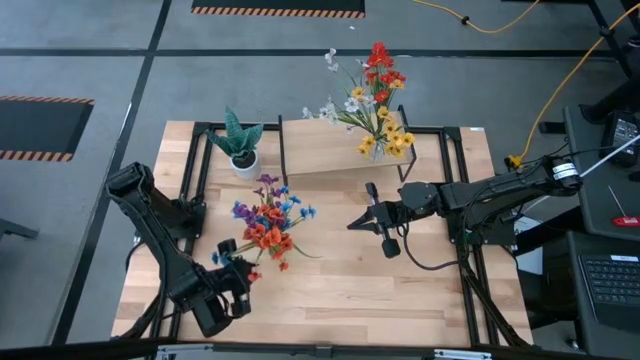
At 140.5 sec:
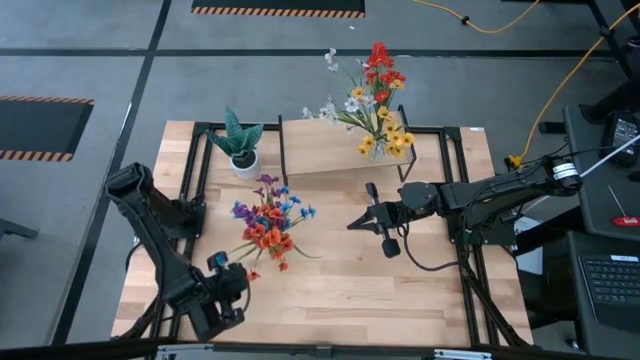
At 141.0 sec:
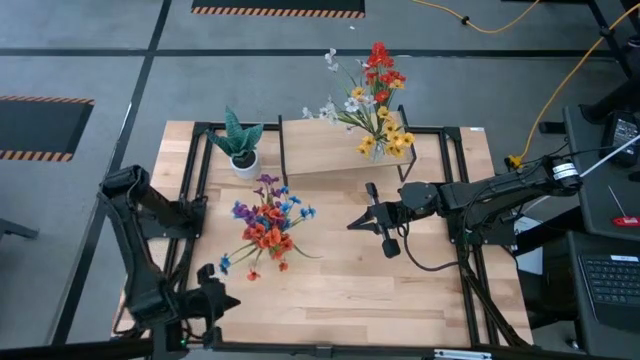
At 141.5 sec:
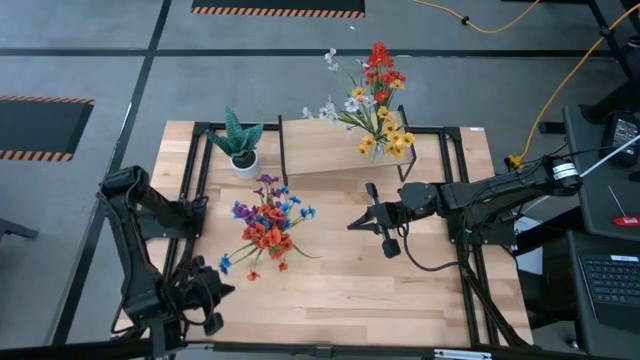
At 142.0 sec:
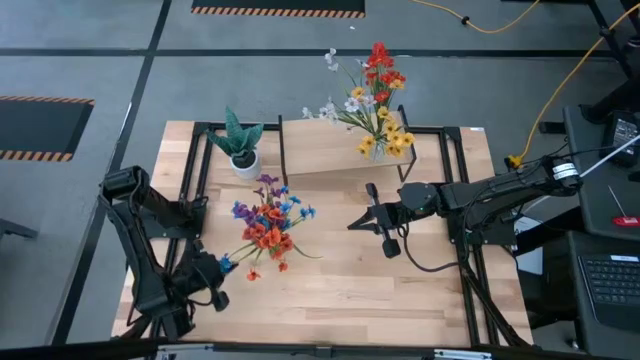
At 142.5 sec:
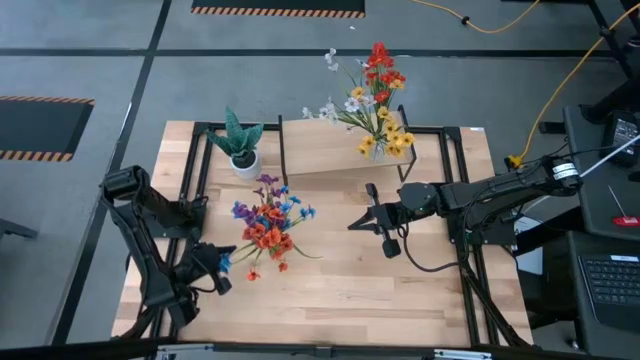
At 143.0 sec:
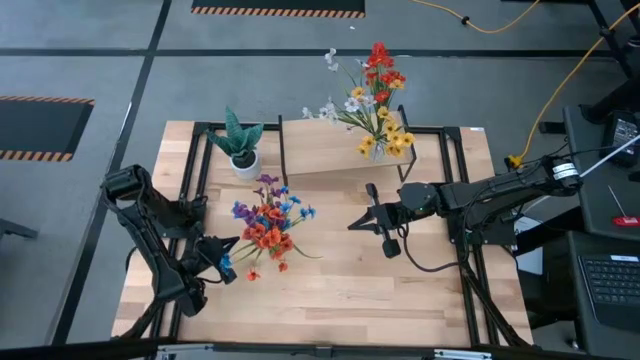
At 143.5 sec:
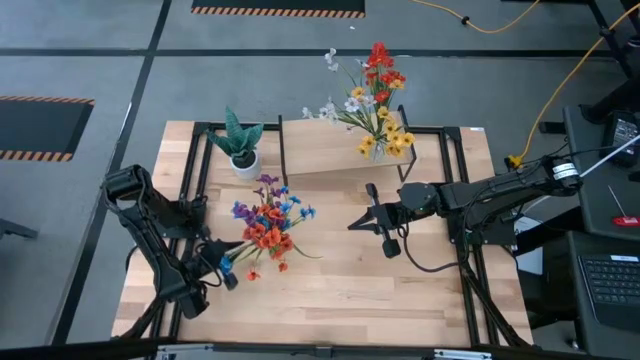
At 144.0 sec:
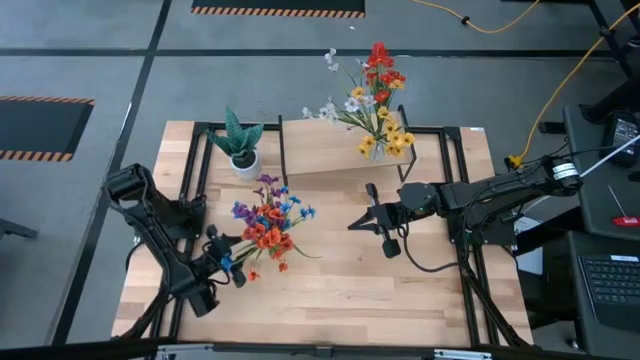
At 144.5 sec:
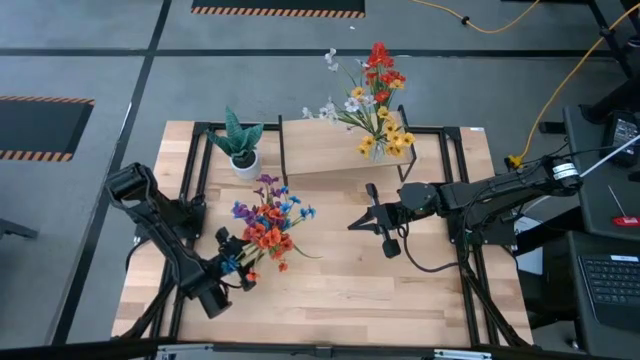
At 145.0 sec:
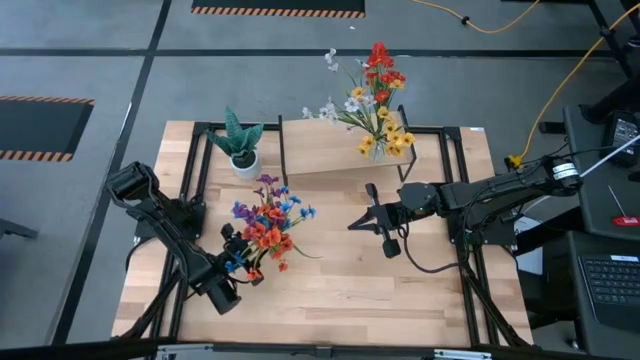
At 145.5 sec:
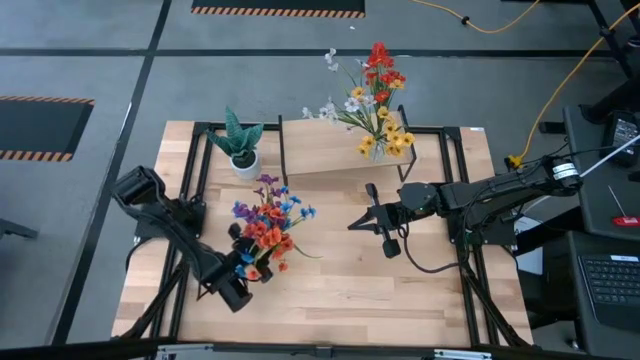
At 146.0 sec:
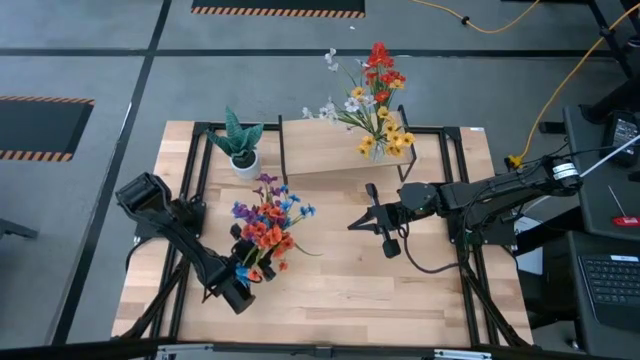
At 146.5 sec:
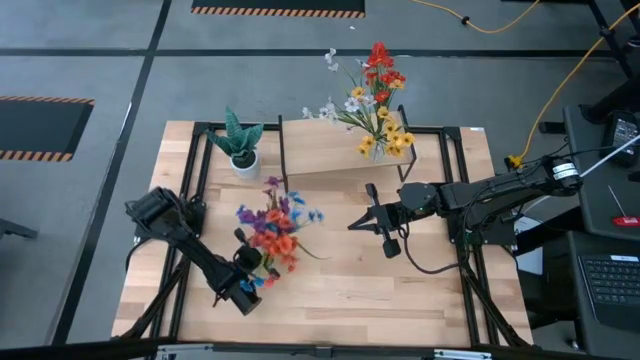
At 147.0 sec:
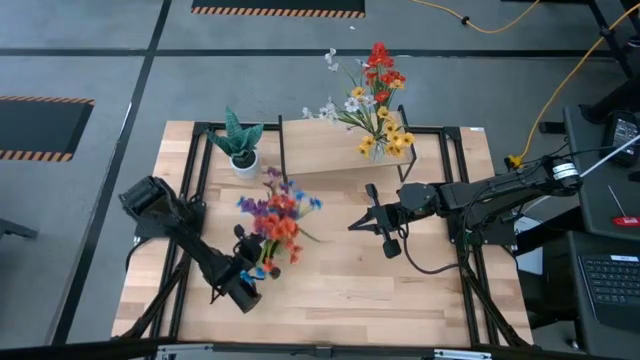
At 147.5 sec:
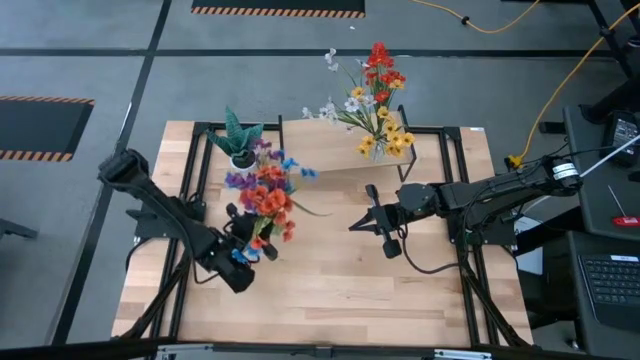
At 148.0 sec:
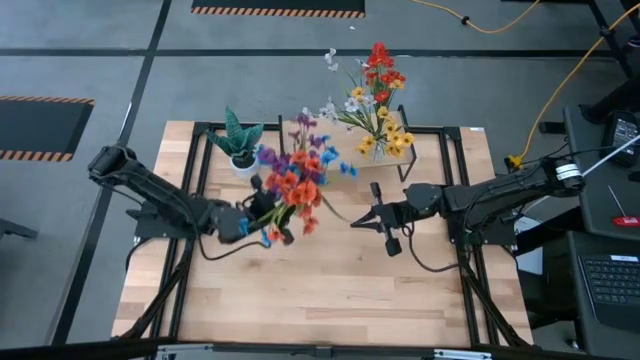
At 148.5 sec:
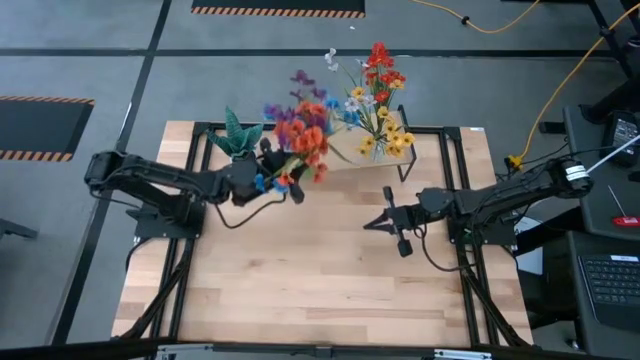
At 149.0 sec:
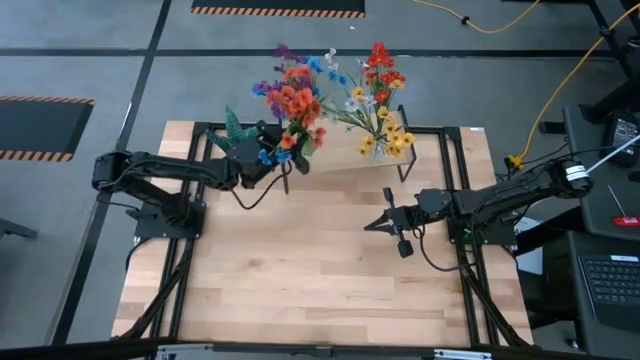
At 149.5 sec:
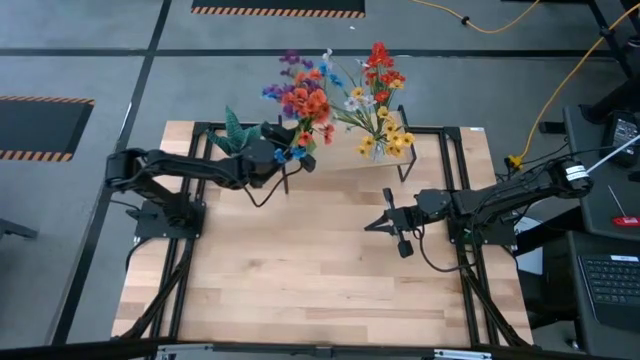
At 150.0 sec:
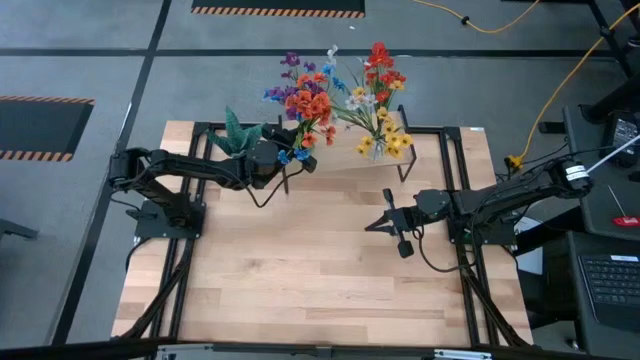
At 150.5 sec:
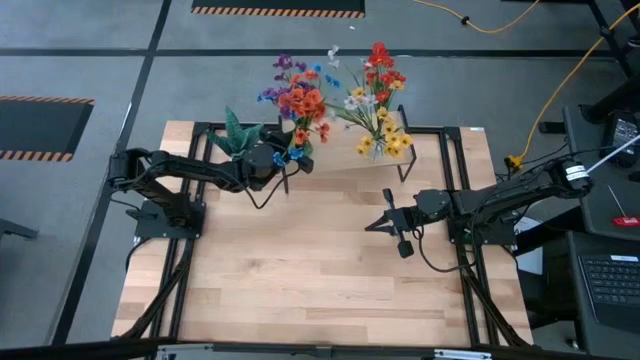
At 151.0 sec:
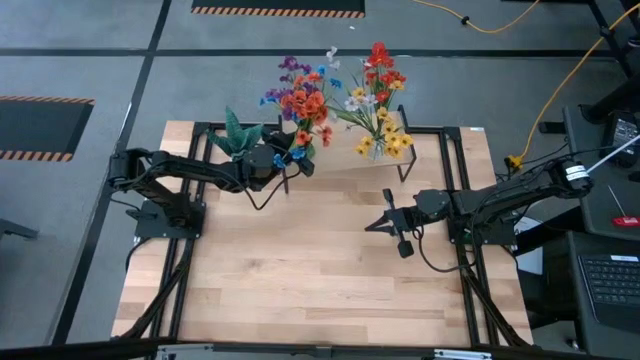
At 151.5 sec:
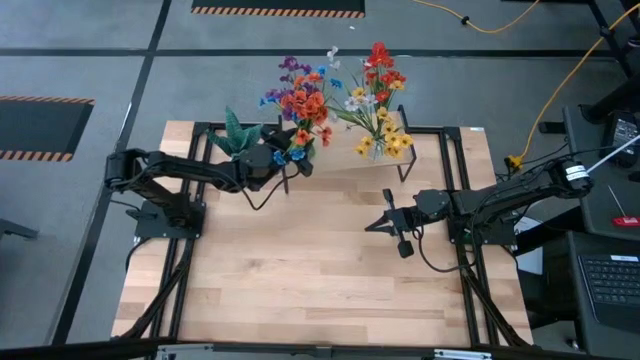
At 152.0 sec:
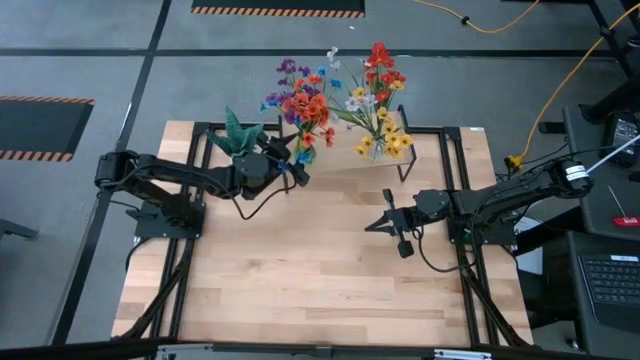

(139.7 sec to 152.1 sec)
Task: Pick and place flowers into a vace then onto a shelf
Put the green transparent vase on the shelf

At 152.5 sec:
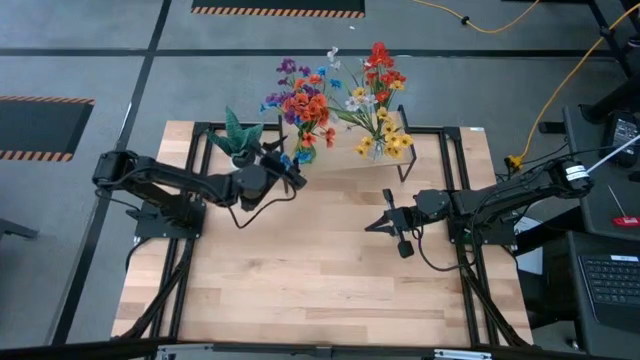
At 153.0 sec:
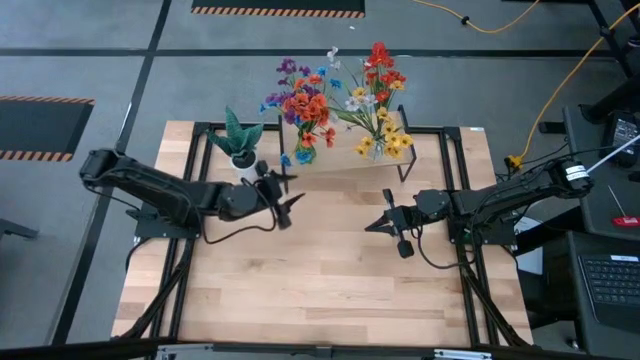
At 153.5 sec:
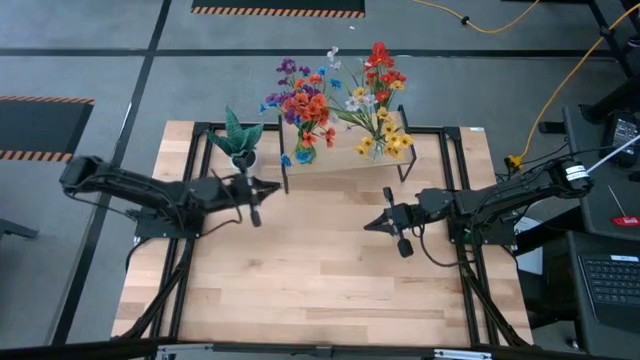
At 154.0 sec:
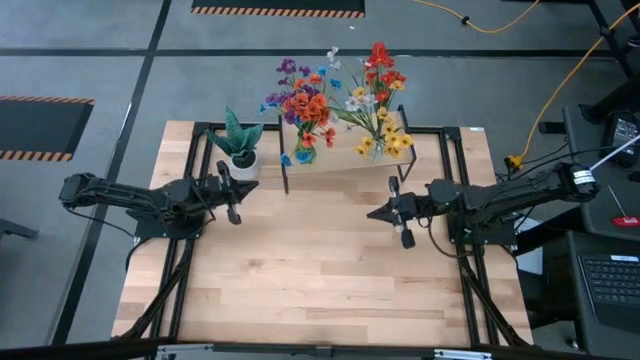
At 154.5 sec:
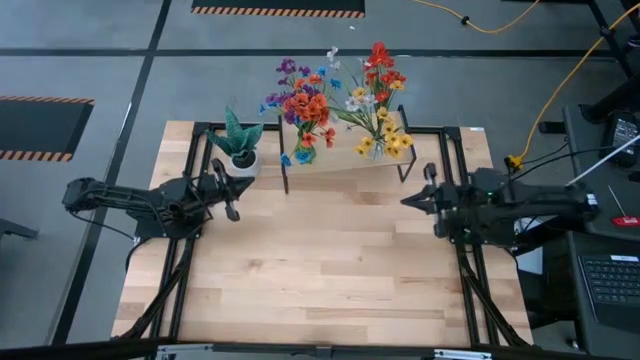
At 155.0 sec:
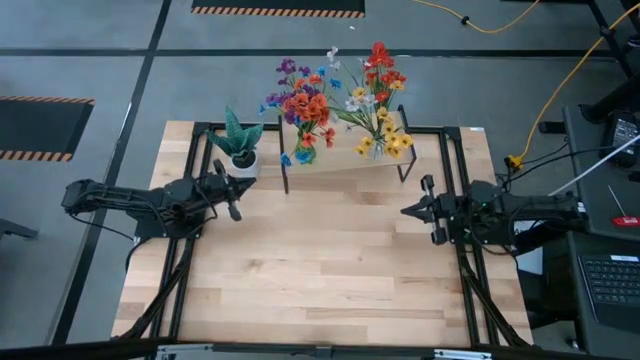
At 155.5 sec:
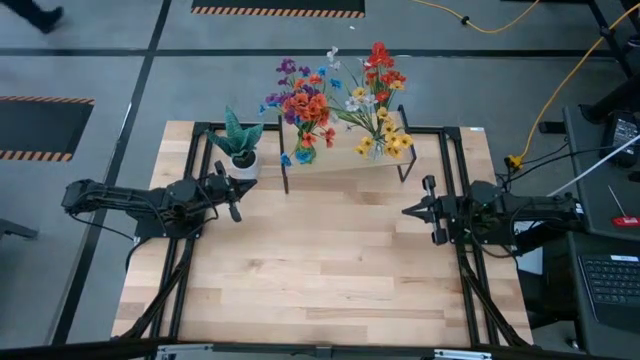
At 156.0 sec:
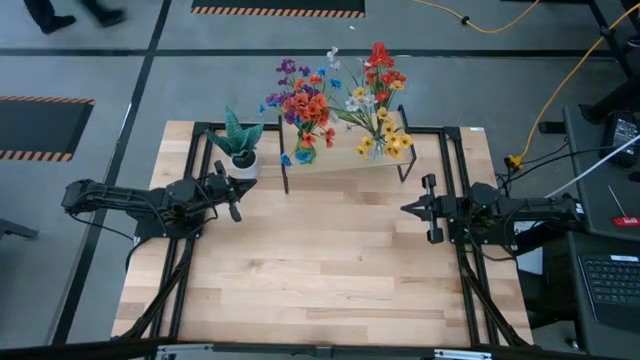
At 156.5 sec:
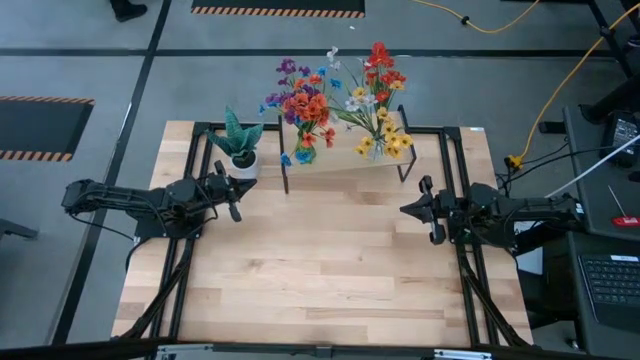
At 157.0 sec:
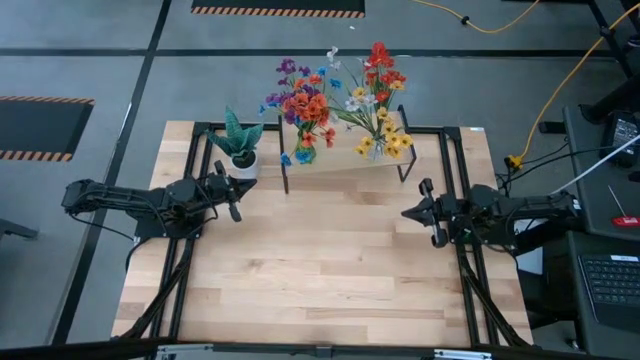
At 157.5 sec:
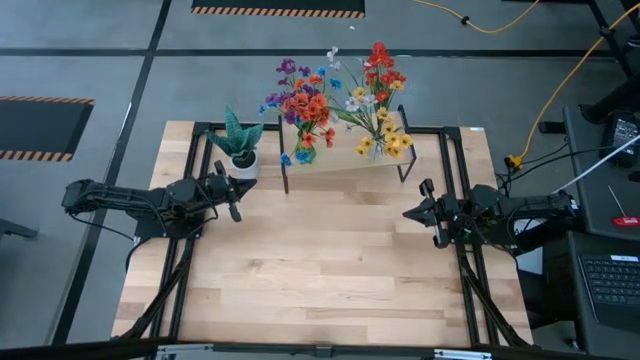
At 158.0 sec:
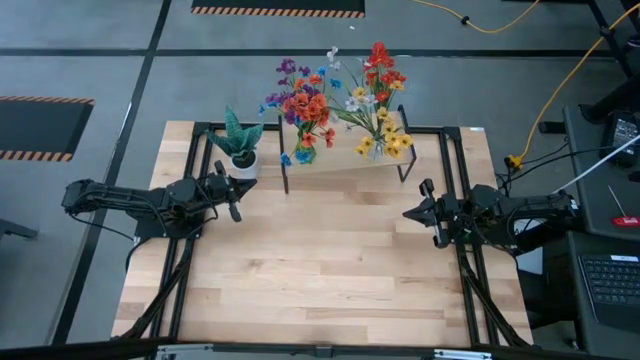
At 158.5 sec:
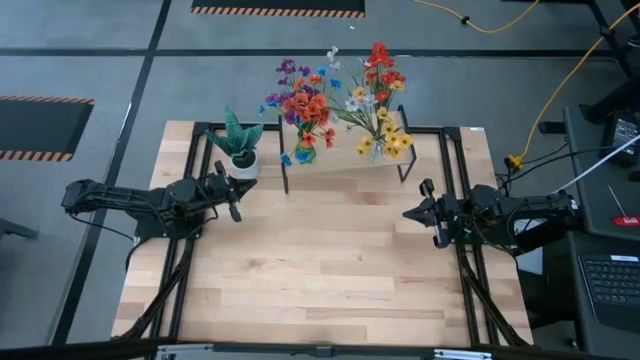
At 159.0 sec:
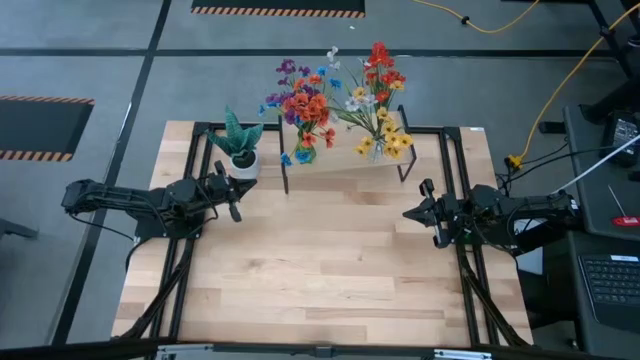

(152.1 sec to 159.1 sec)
Return to Home Position

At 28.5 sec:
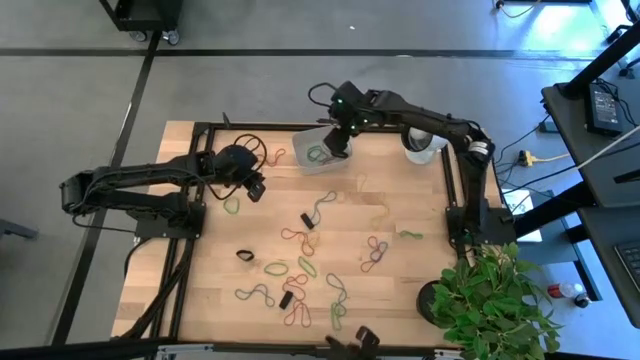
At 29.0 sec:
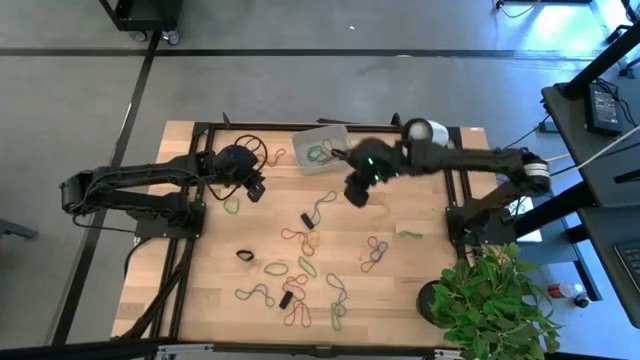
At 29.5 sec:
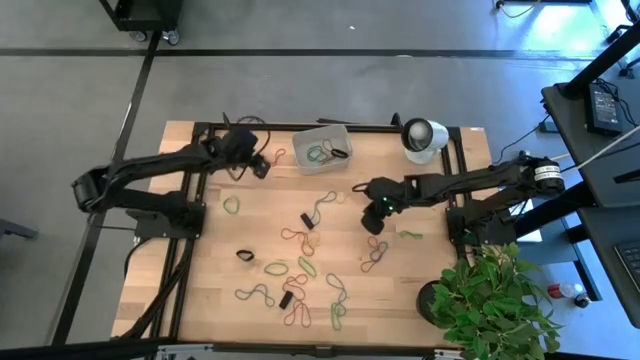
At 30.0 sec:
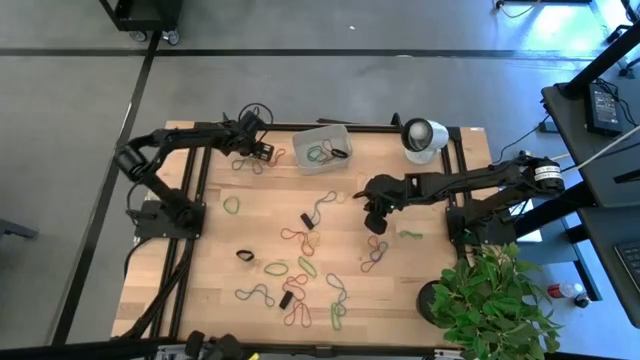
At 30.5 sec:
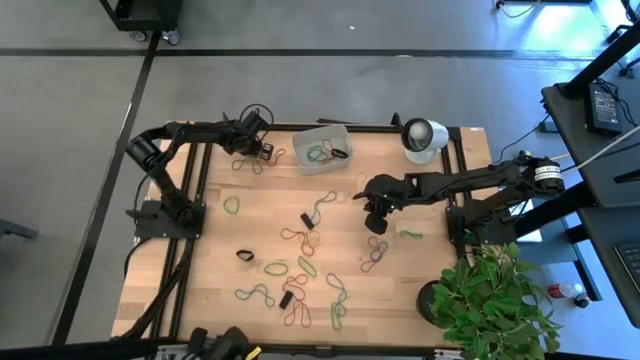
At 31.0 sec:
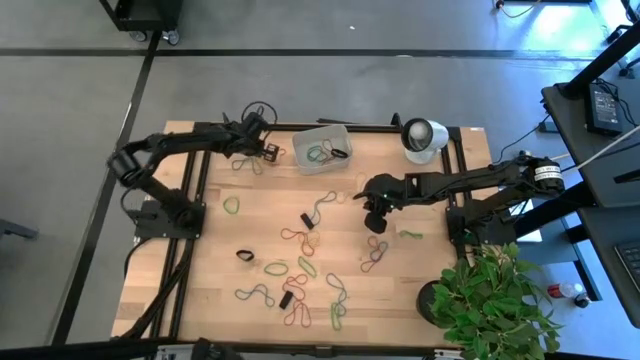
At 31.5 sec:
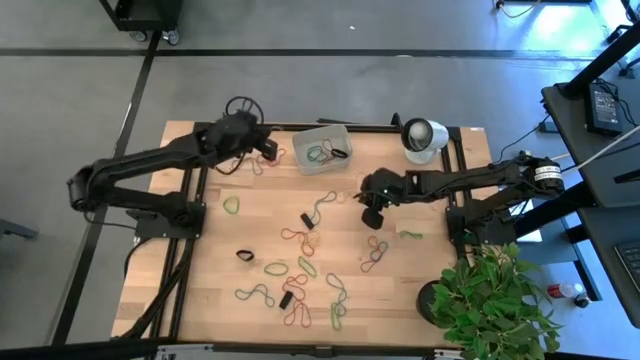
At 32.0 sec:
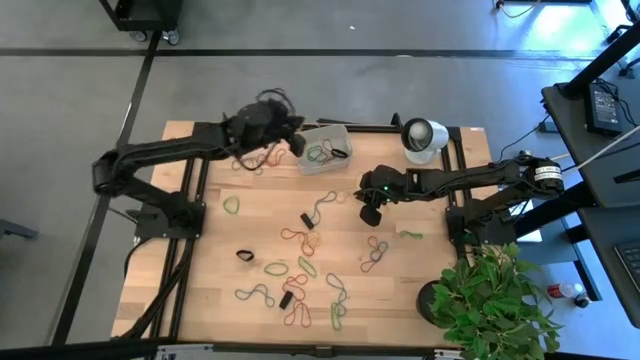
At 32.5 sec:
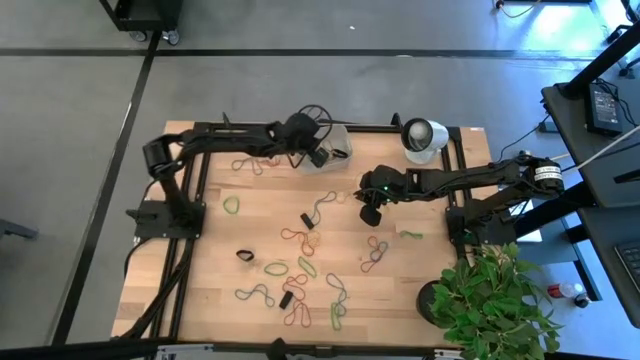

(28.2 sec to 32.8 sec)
Task: Pick and place rubber bands into bin
Put the yellow rubber band into the gray bin
